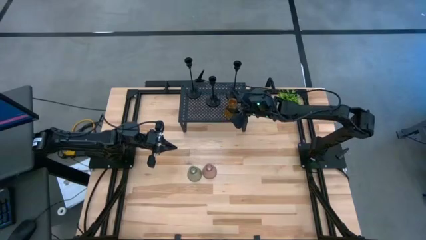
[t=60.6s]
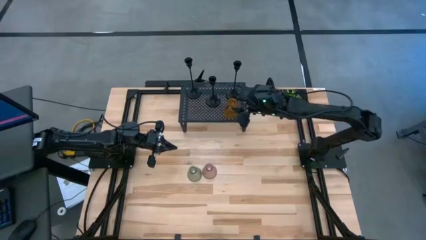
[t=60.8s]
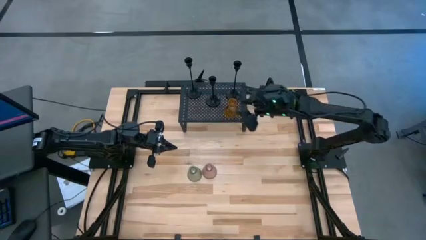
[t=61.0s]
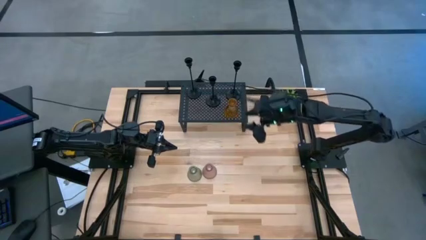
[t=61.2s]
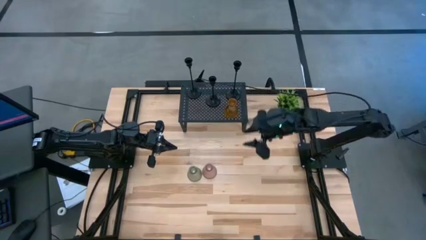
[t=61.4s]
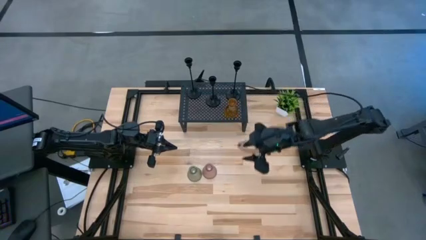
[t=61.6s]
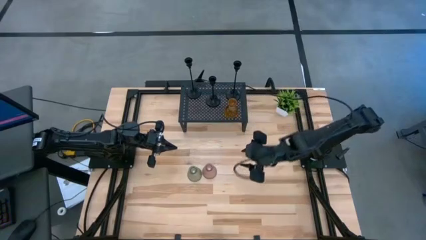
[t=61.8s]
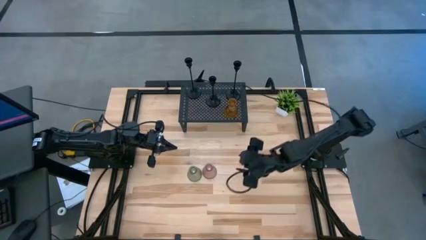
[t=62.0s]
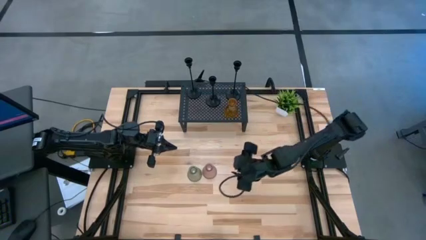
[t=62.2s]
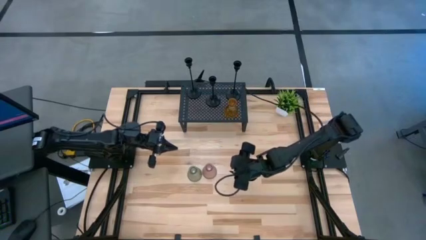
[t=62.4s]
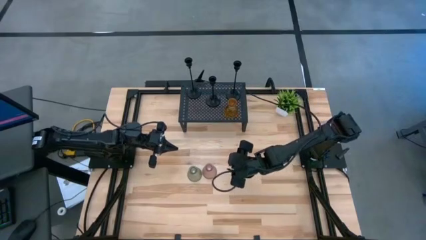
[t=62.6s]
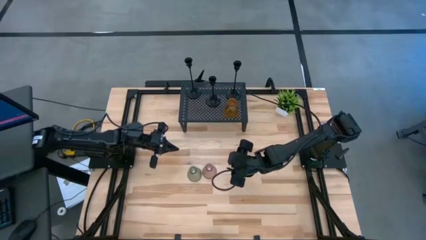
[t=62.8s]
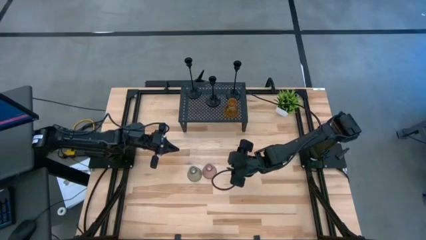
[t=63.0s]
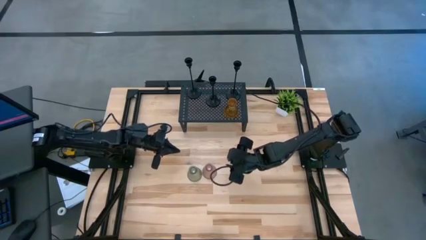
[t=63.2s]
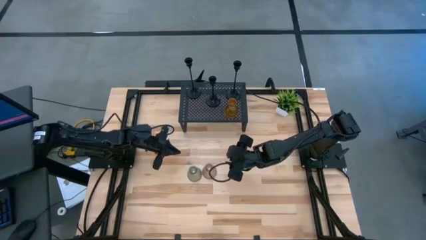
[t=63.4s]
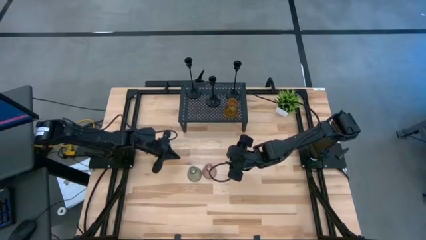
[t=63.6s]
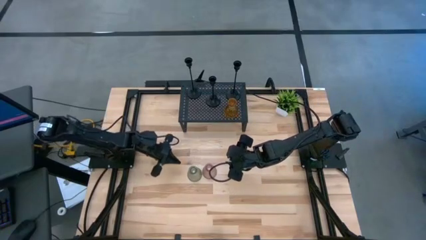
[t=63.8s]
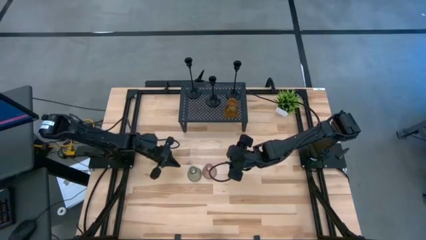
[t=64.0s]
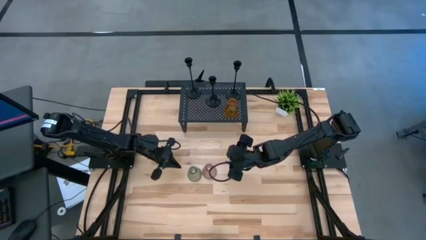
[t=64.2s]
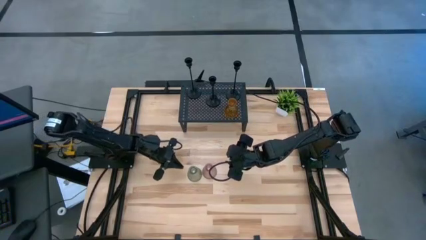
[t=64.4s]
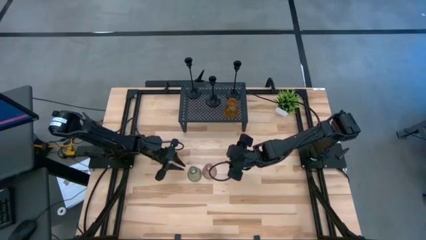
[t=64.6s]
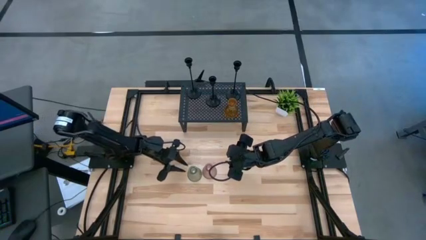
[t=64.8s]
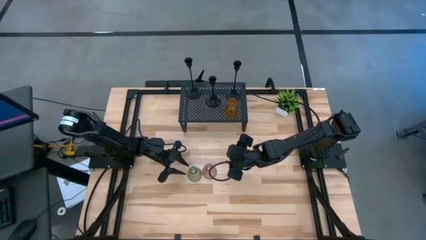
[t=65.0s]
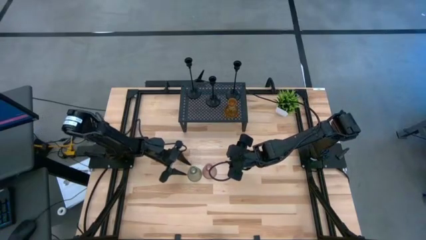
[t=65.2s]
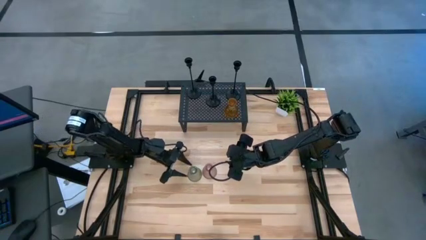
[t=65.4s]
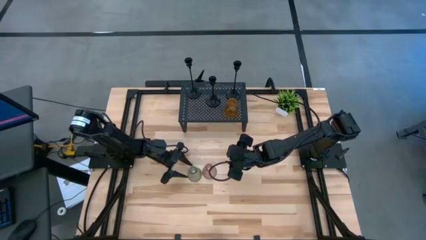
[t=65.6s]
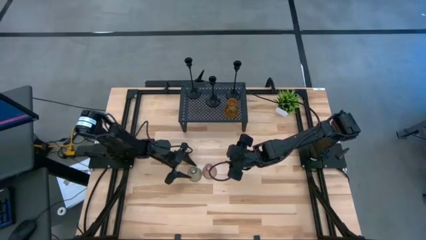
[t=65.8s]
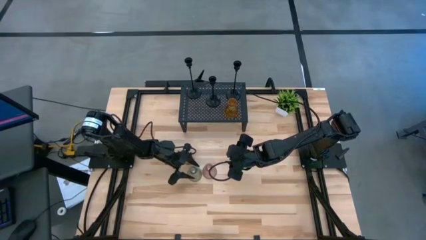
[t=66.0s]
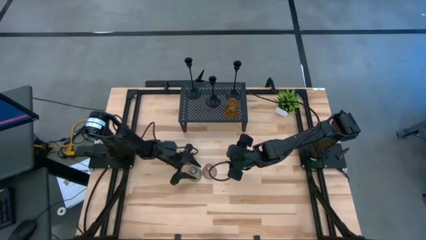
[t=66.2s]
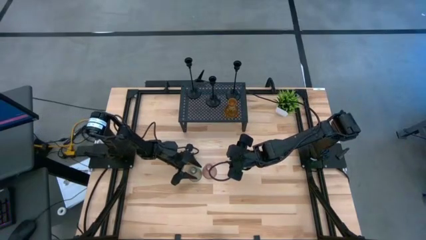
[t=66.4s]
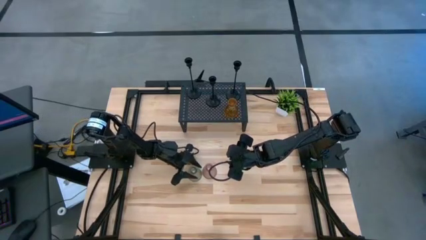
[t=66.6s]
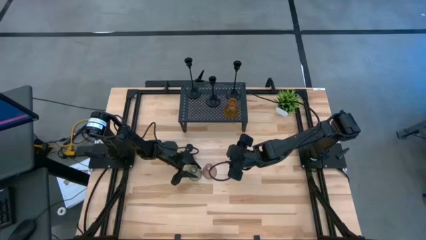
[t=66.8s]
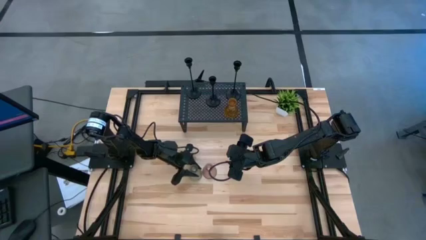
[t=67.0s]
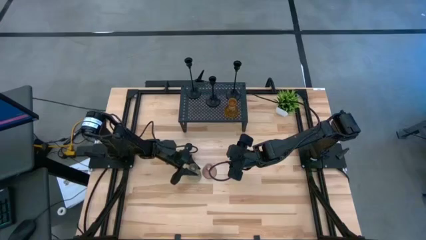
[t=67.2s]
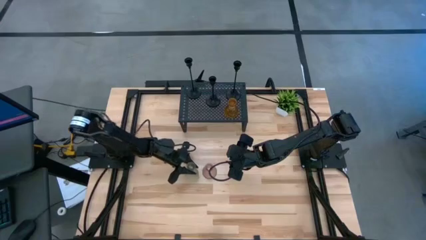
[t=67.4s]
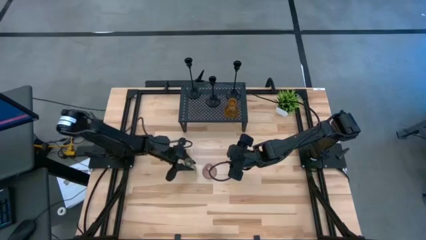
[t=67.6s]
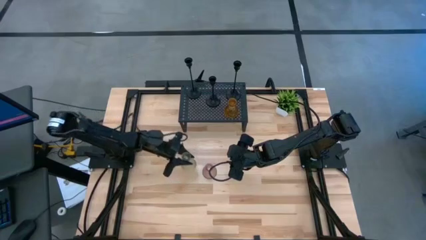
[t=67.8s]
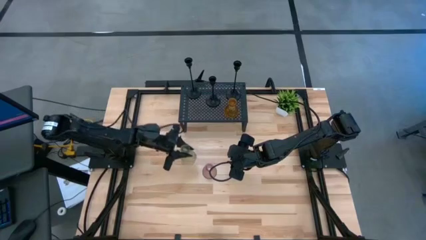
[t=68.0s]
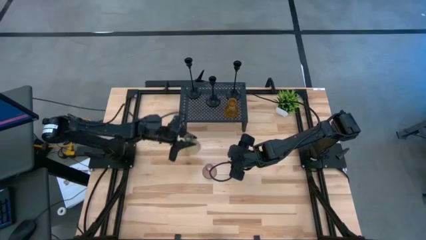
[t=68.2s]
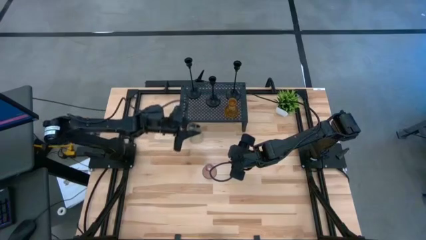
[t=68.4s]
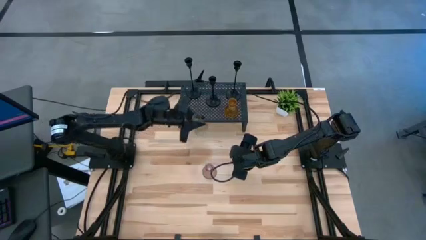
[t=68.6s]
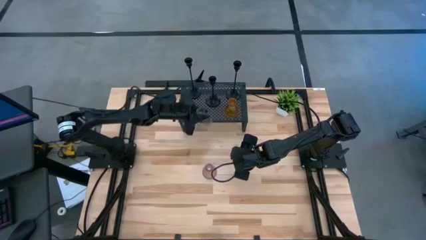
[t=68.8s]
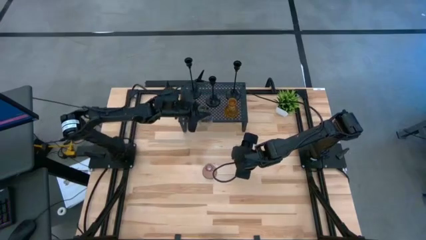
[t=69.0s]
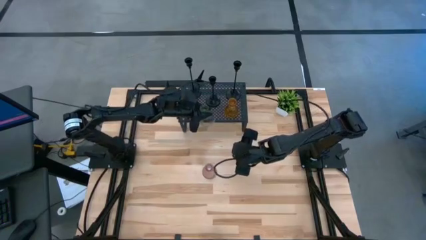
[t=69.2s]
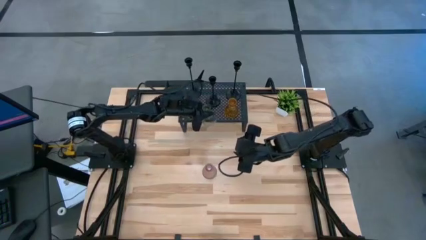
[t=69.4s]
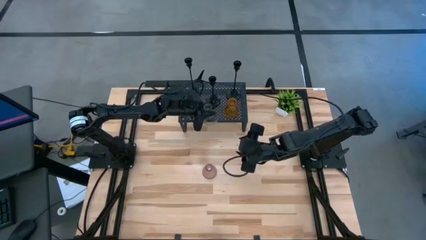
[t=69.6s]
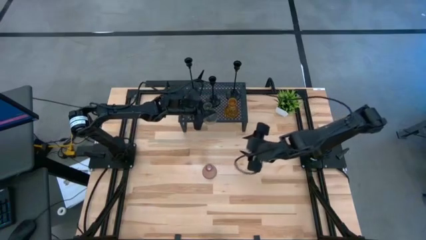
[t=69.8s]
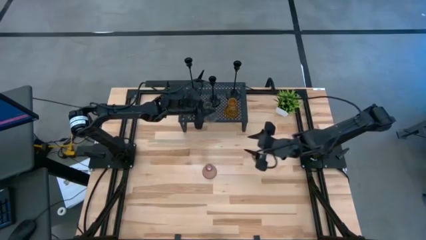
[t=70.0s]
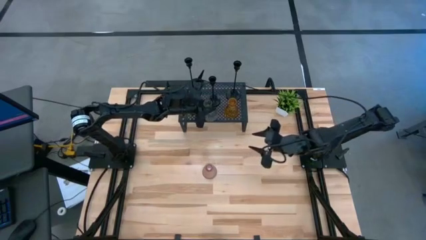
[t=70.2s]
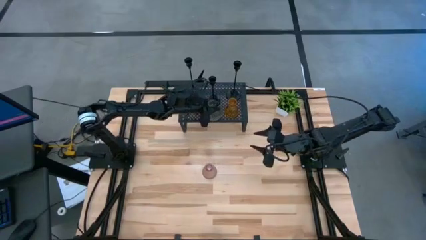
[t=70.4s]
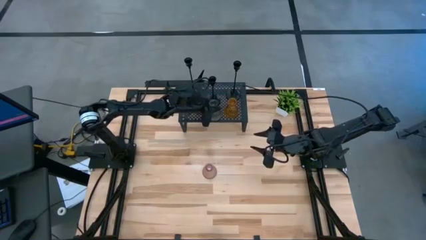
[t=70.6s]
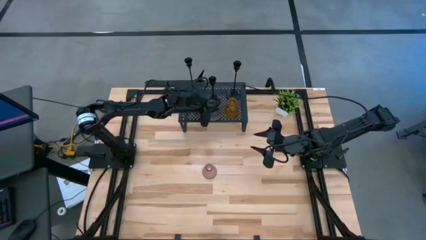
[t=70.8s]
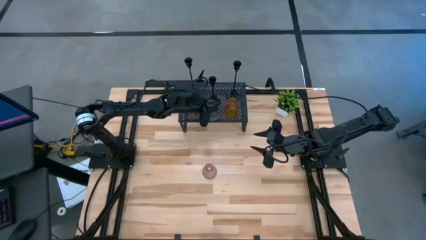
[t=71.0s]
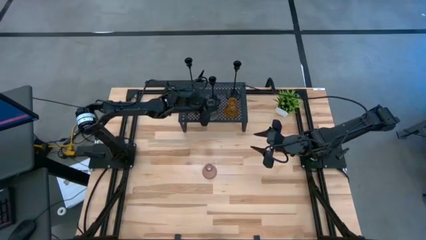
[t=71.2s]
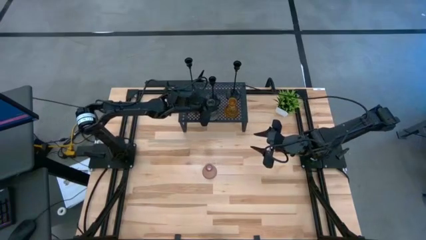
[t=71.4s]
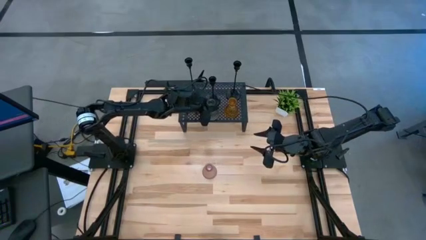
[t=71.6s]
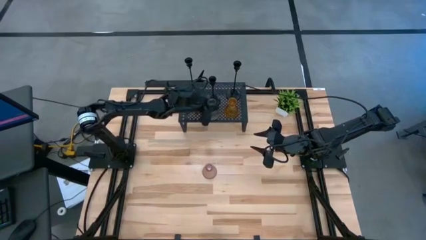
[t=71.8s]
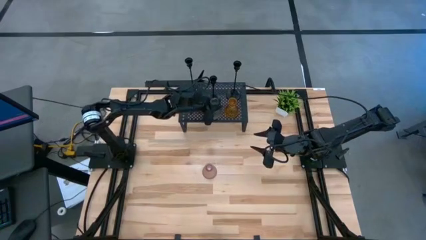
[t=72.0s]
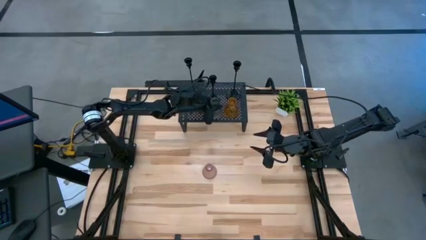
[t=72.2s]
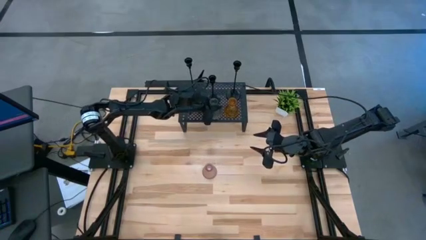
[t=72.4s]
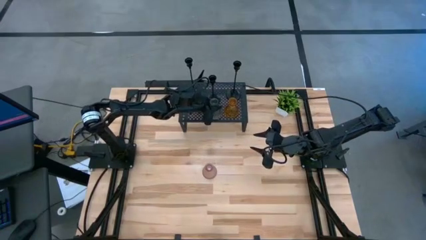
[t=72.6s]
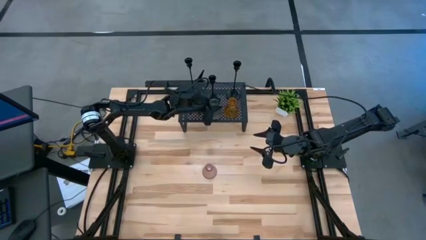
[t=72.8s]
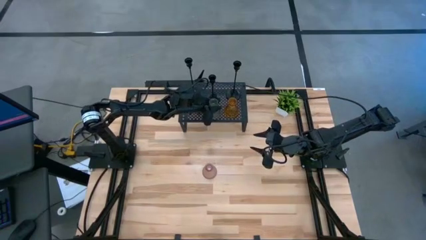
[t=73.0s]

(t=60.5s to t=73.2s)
Task: Pick & Place candle stick holders
Put the green glass candle holder on the shelf

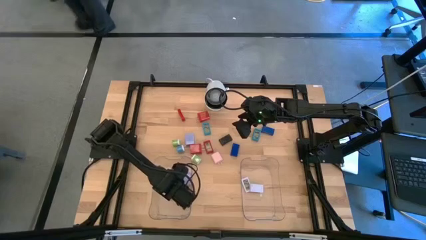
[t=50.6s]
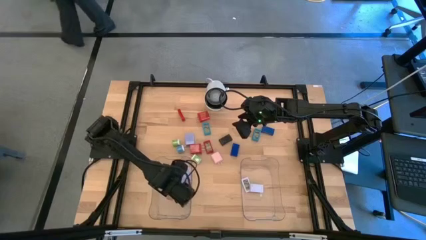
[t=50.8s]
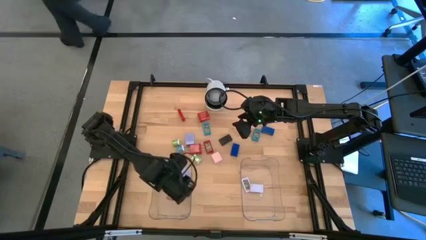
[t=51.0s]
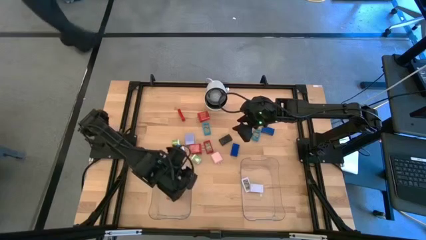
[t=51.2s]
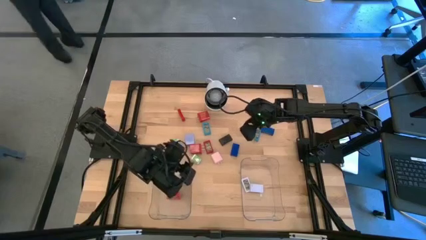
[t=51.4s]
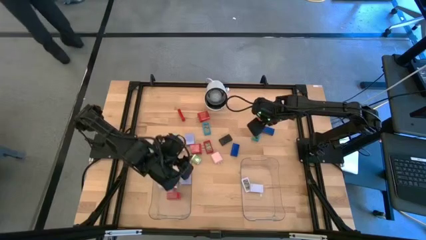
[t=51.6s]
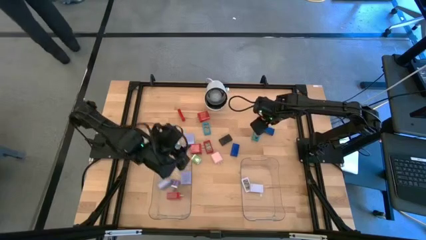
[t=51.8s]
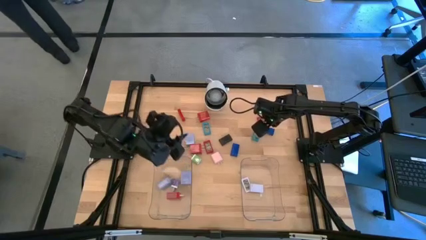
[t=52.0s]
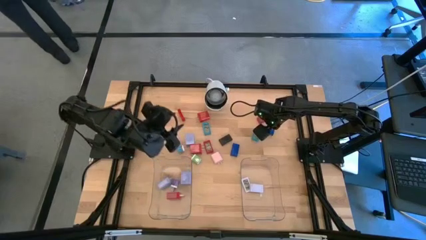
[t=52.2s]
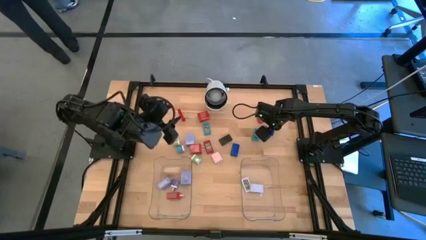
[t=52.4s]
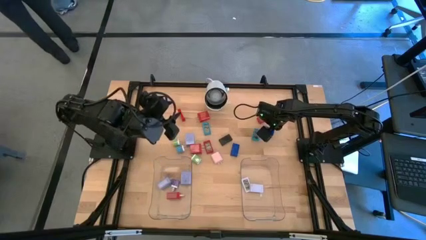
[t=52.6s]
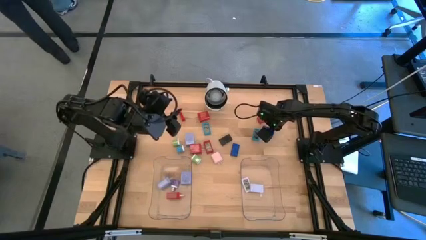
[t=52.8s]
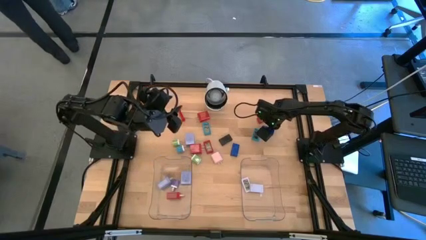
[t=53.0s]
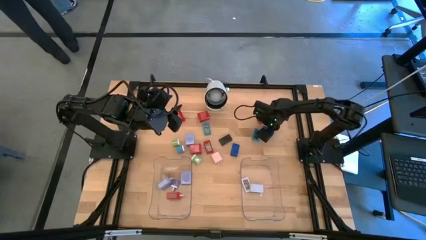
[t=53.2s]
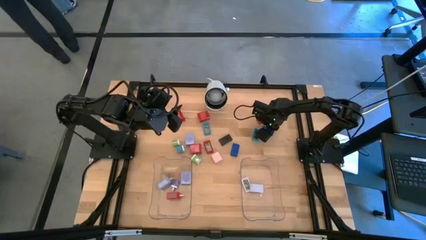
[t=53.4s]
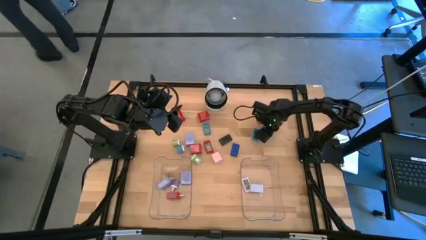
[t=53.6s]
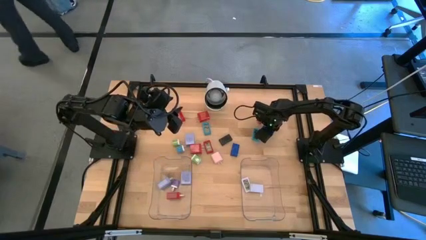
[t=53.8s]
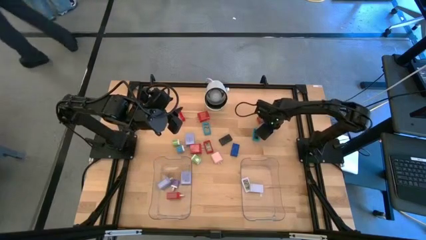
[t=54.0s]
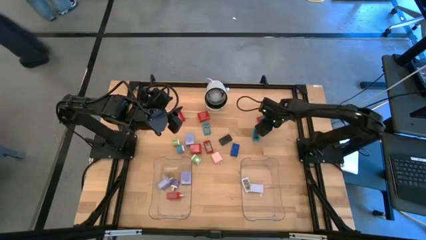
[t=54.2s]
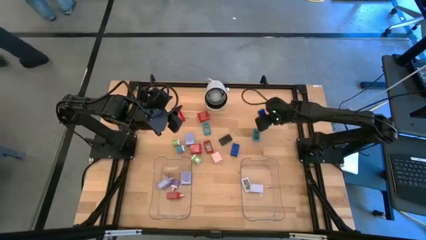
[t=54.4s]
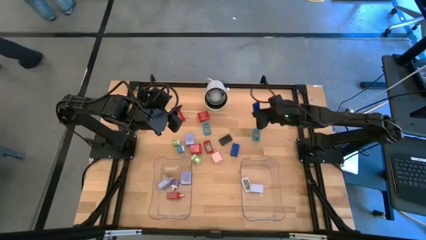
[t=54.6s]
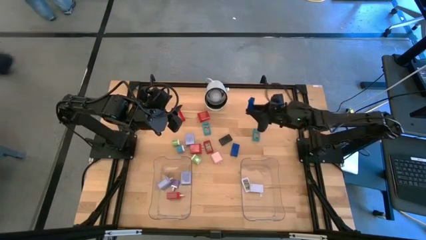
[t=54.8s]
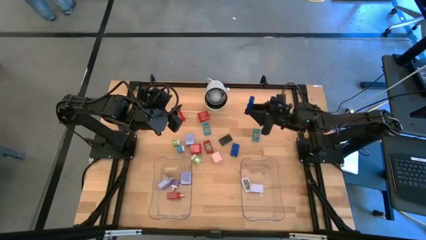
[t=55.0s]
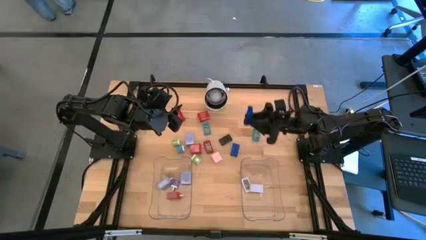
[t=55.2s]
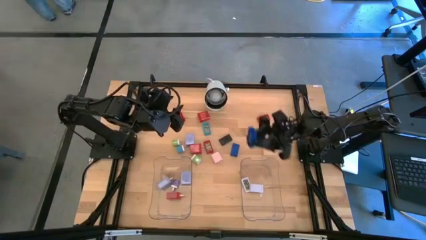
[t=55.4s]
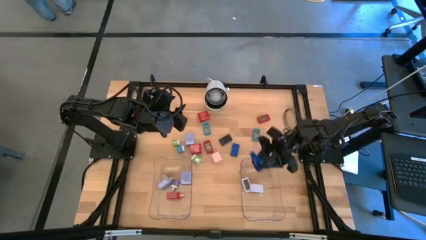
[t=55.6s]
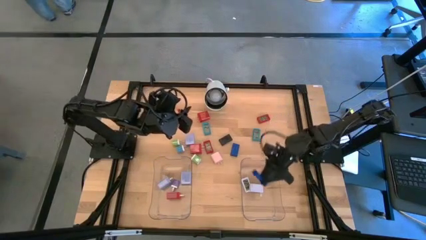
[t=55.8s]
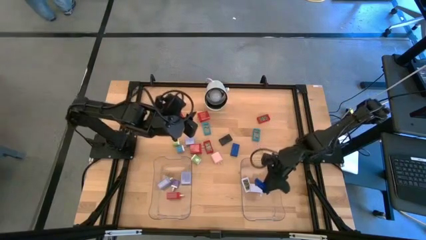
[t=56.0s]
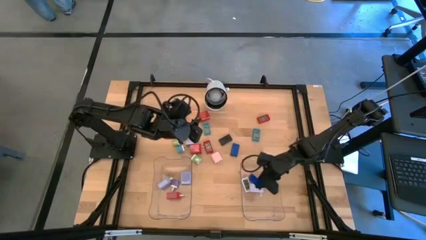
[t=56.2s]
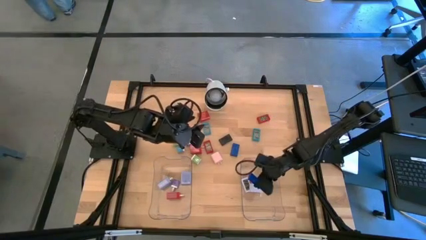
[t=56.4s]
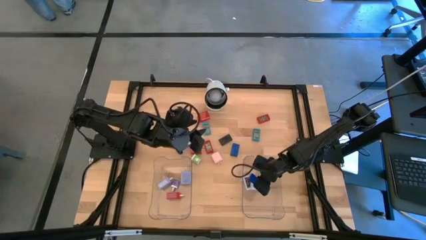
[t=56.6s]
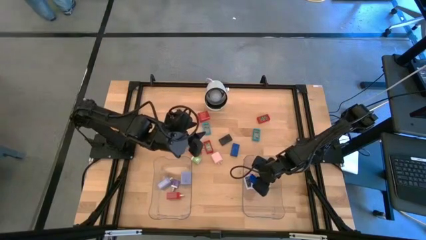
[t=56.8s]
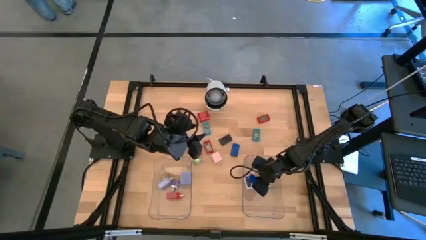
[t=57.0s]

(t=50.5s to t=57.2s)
Task: Pick & Place Office items
Put the right blue timer into the right transparent bin
